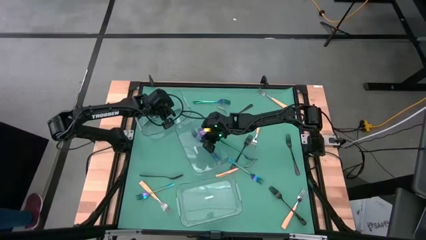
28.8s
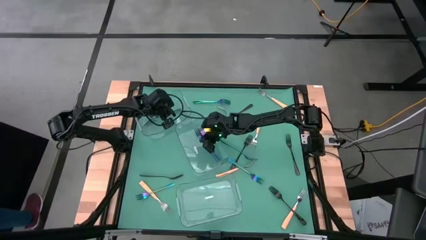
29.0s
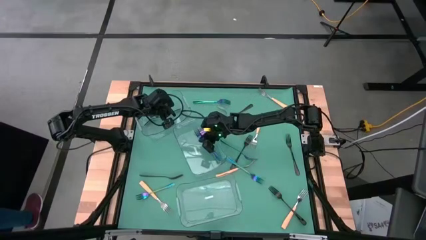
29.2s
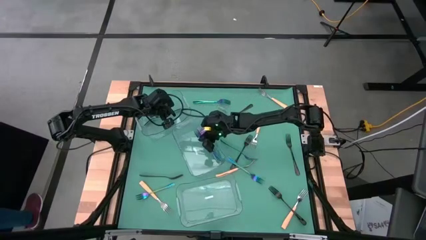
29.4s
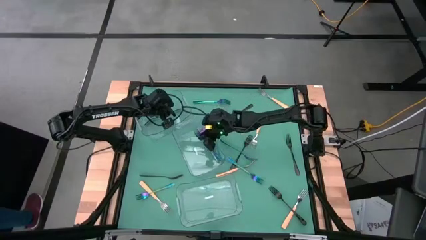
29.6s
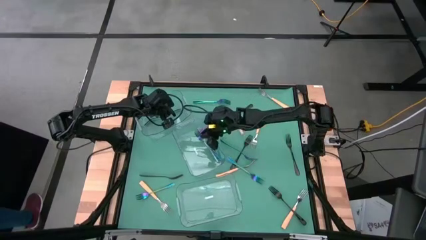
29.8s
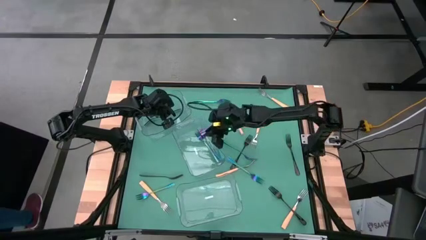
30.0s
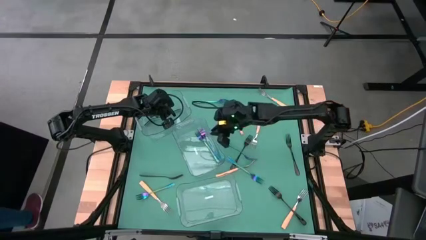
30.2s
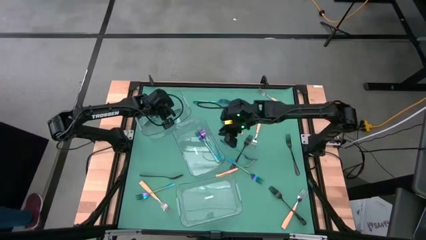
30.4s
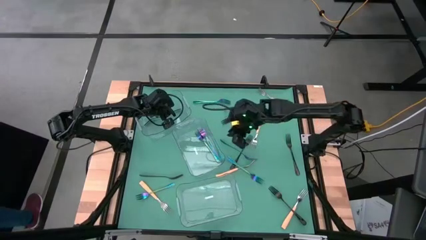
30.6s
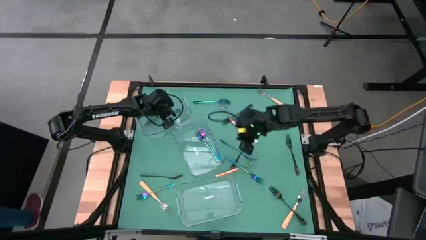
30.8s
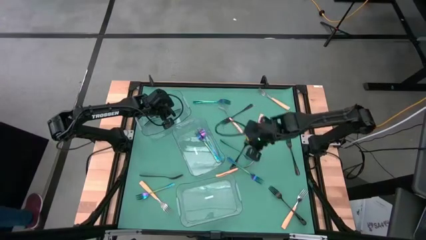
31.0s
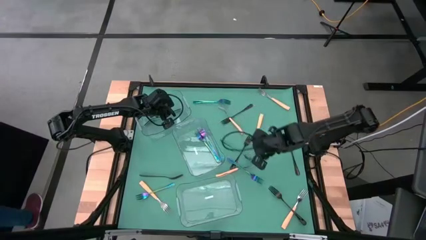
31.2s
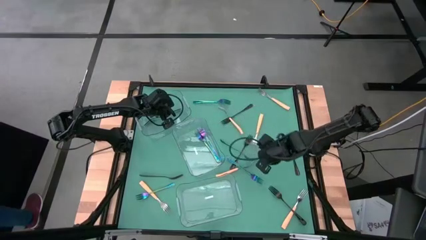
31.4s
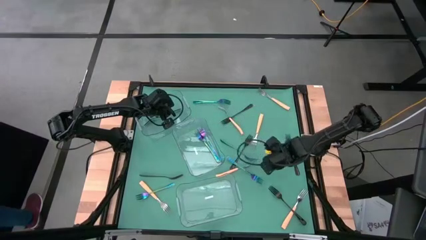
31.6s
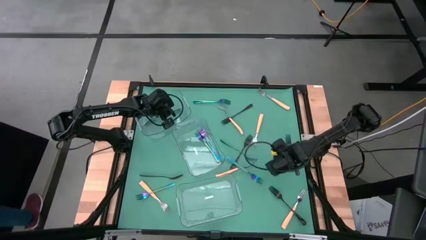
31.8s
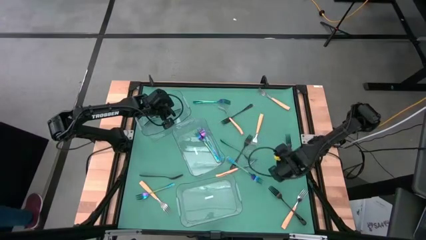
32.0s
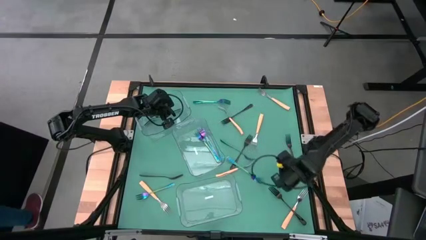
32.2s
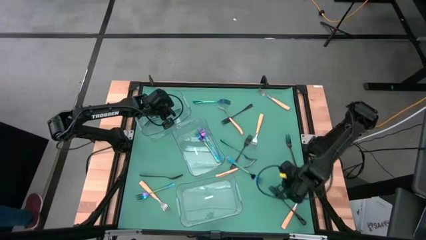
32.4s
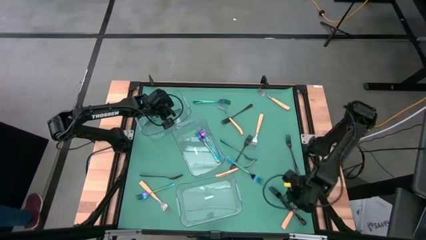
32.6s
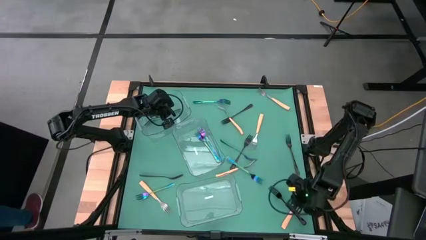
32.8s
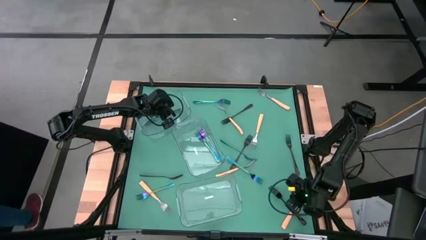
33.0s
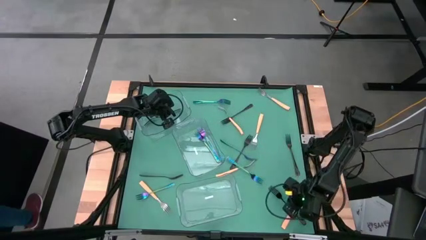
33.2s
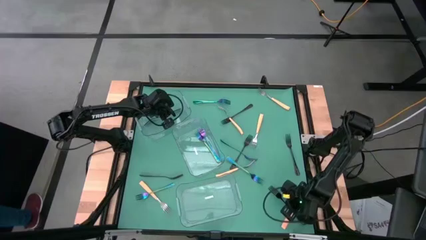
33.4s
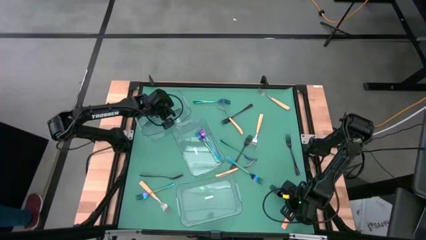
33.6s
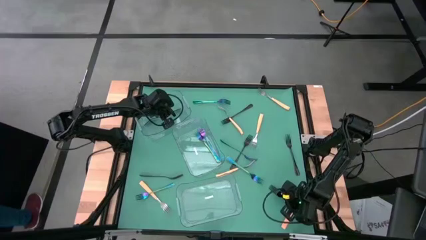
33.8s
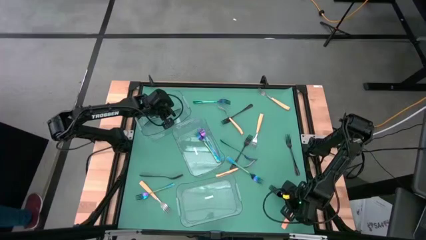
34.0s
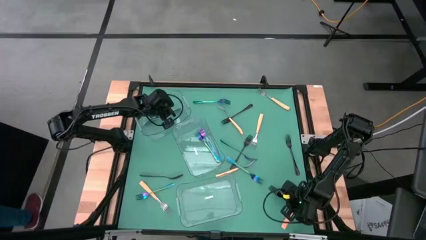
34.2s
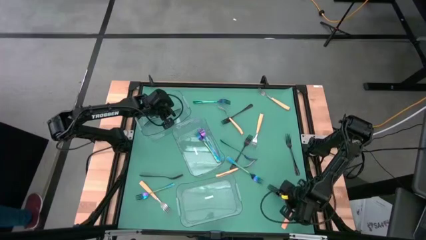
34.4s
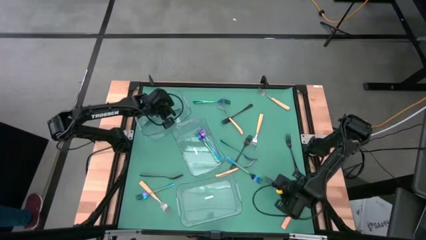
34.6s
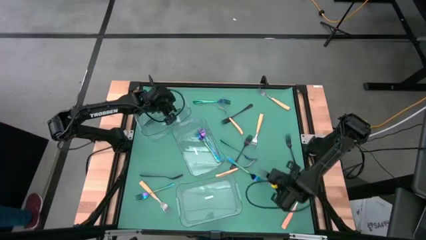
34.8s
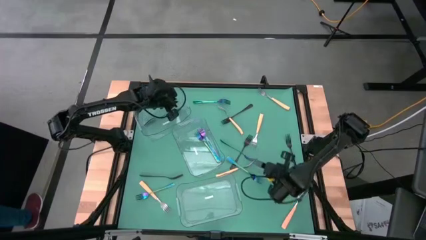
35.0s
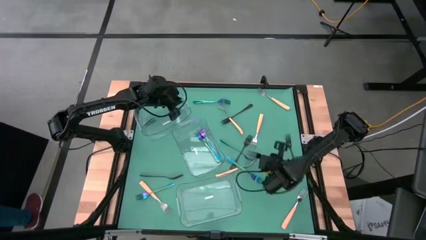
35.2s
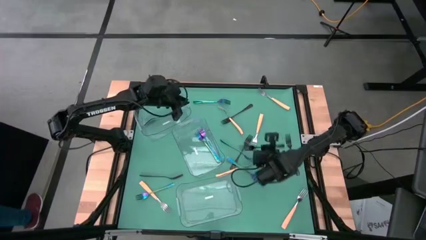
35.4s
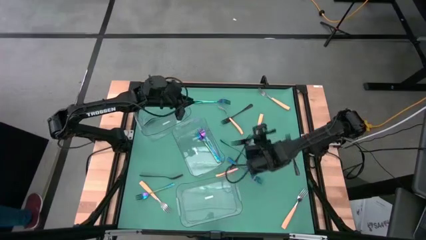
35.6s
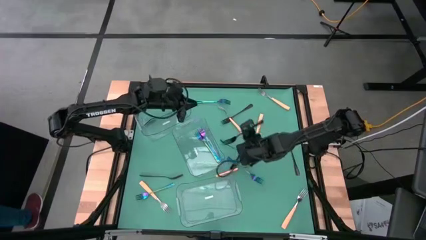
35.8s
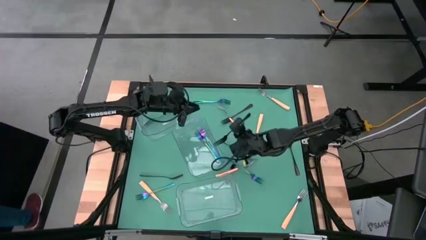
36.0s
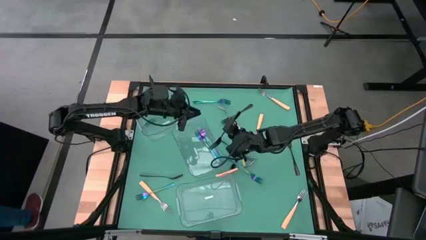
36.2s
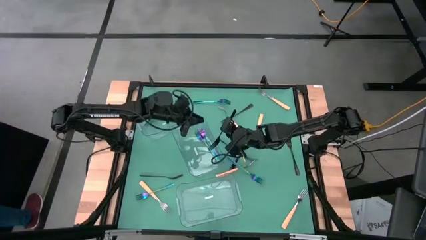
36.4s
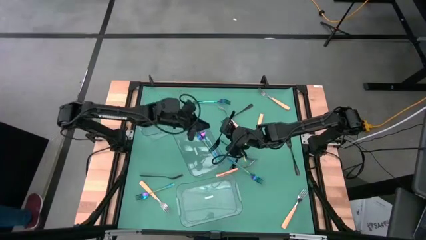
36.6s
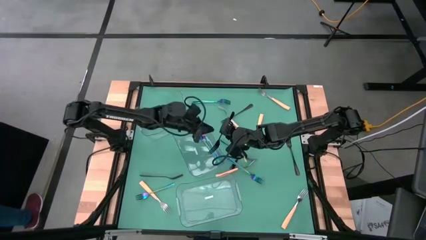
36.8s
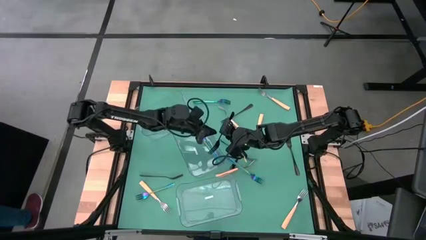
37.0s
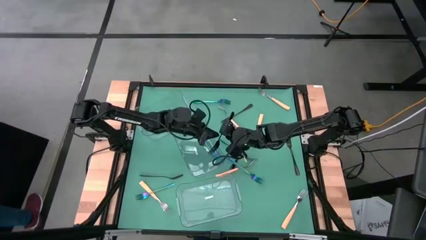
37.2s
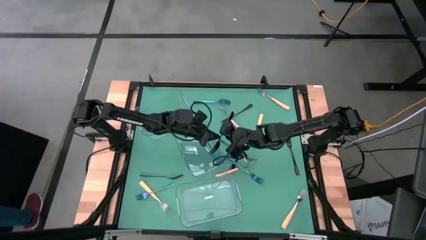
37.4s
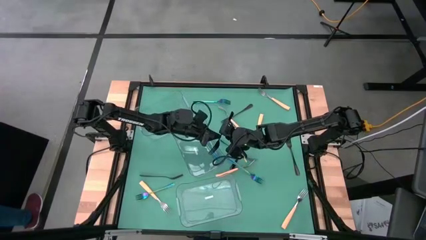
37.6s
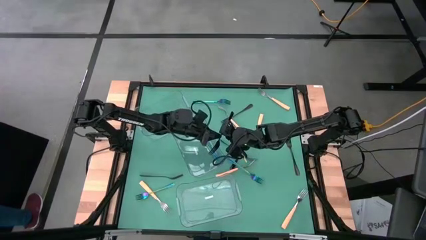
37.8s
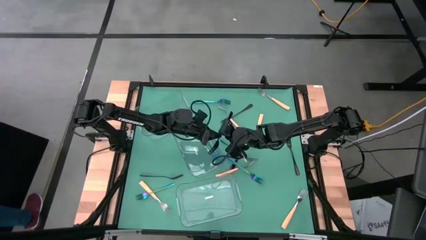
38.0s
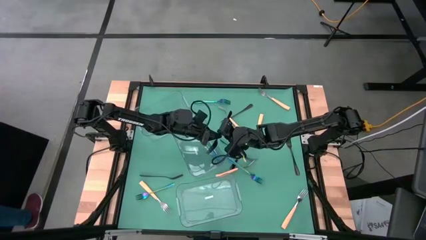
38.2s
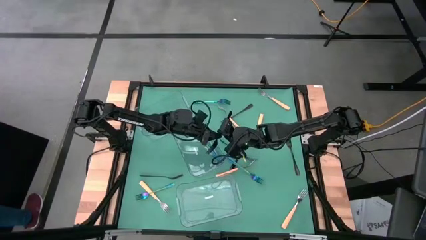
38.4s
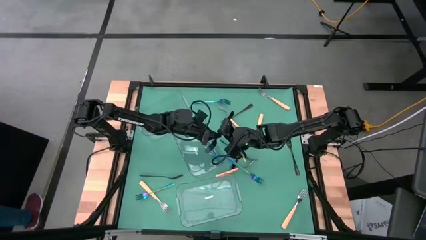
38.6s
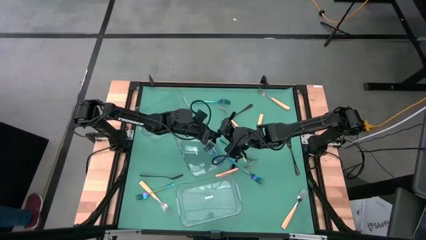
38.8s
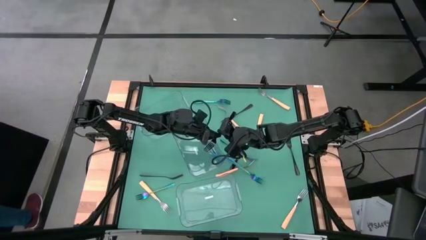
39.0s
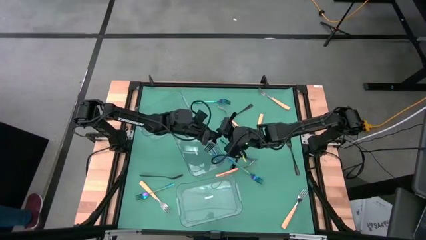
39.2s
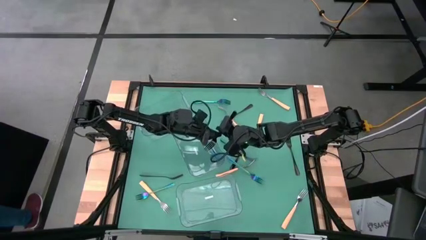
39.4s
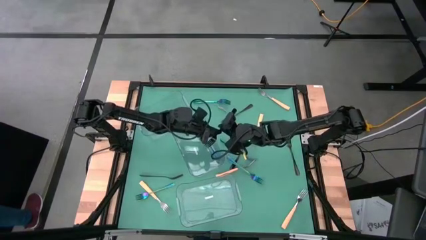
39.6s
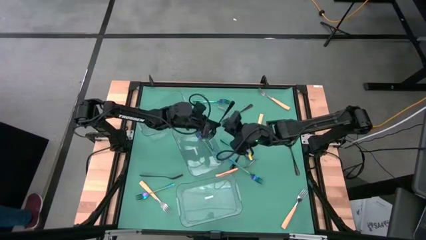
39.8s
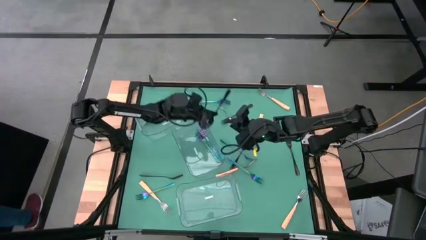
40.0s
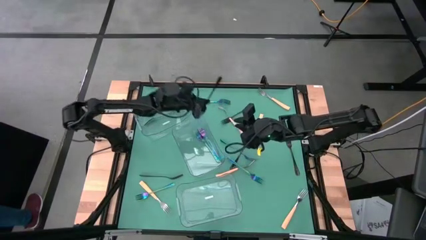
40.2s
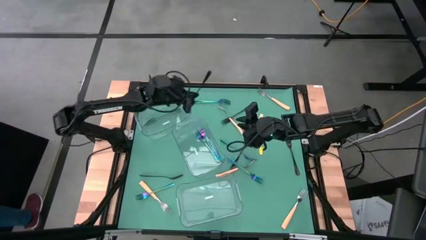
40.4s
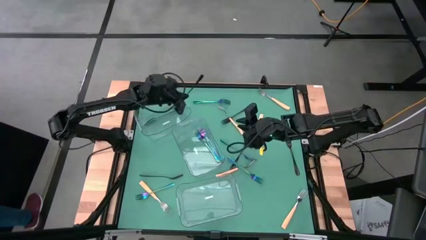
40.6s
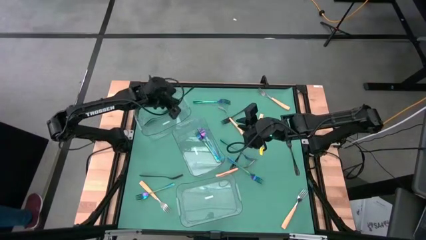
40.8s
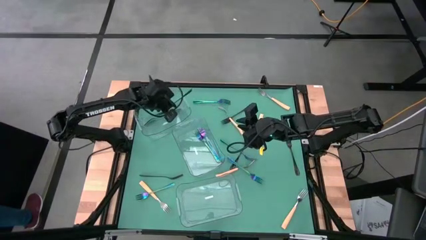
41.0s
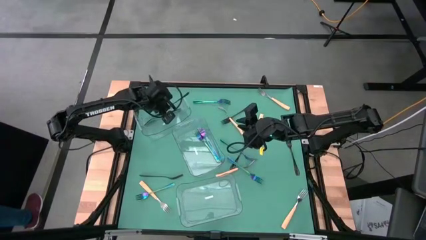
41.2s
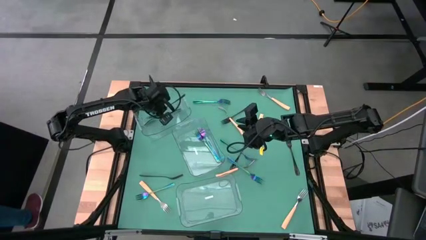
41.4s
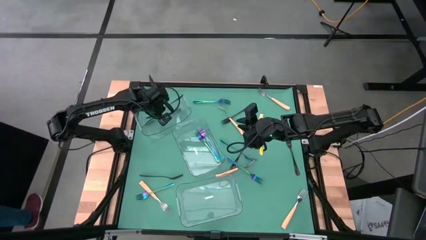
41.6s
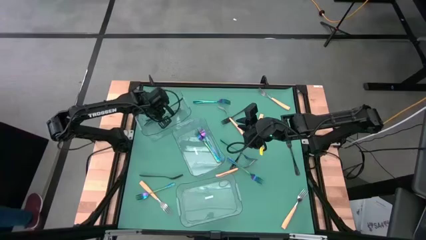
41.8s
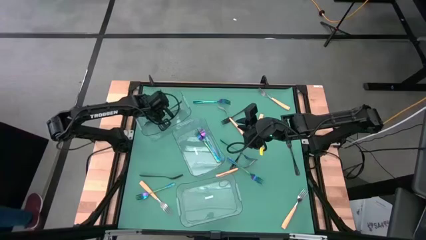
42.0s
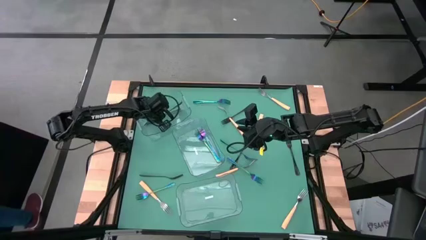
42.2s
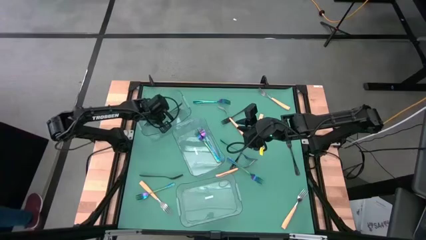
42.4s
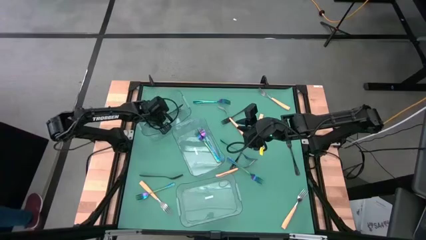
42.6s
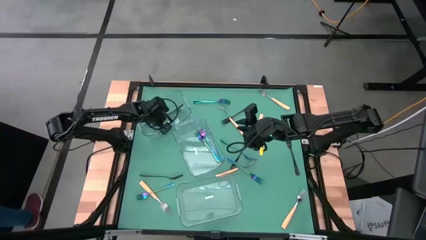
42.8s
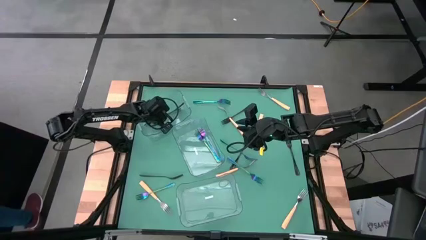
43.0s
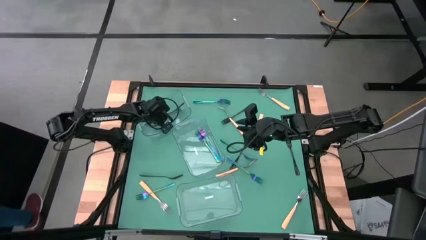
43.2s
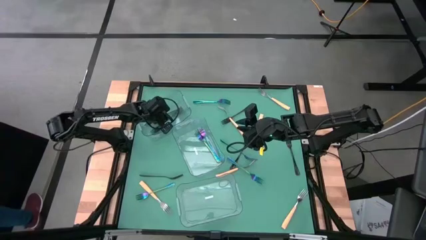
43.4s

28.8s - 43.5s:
Task: Sort silverware by color (type)
Put the black fork into the top transparent bin

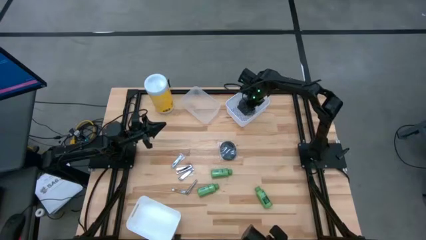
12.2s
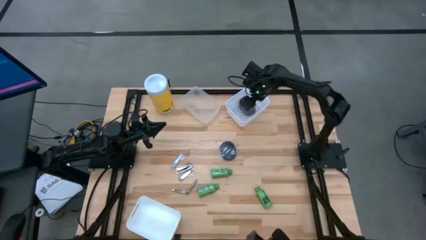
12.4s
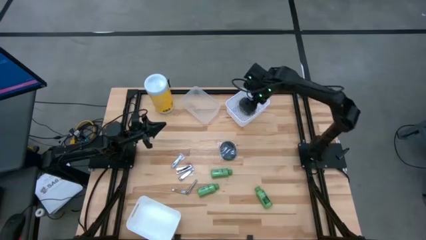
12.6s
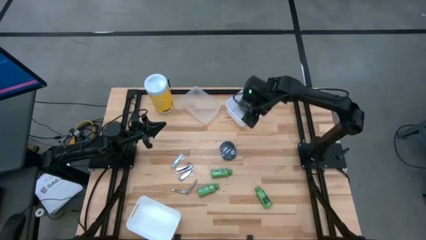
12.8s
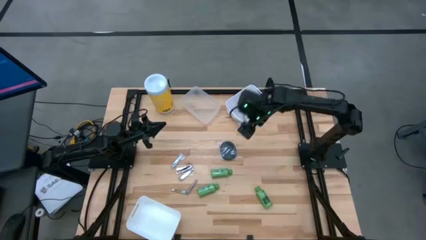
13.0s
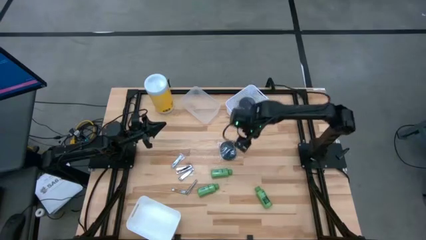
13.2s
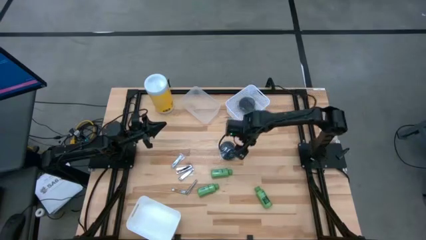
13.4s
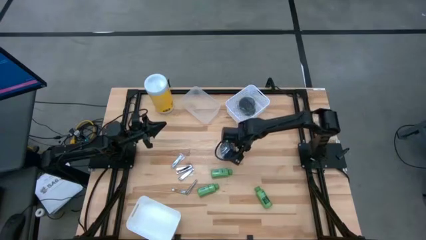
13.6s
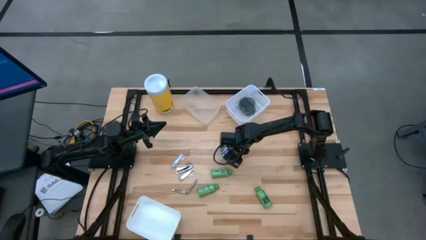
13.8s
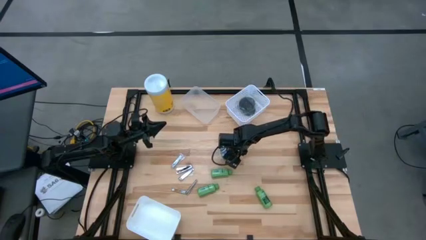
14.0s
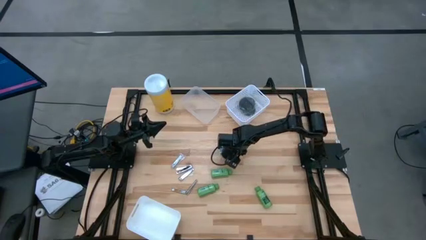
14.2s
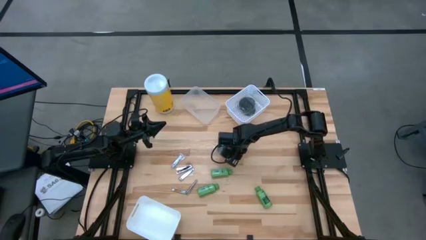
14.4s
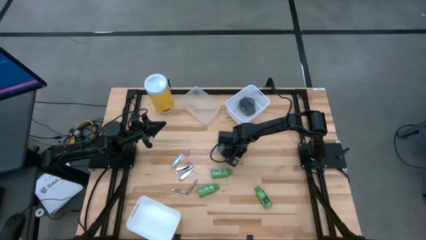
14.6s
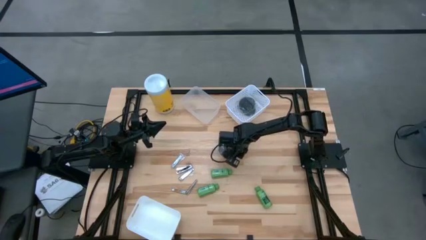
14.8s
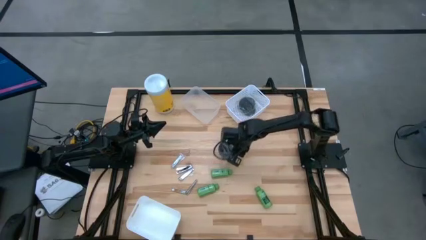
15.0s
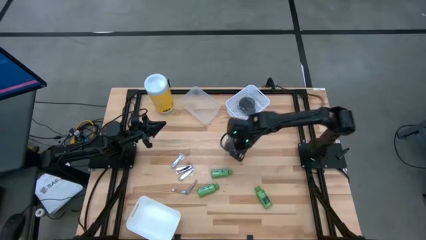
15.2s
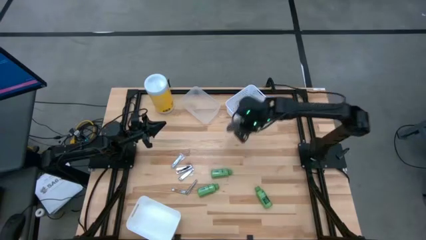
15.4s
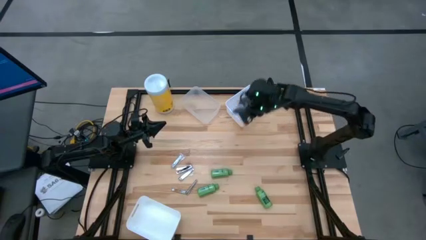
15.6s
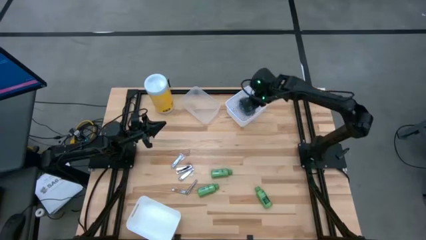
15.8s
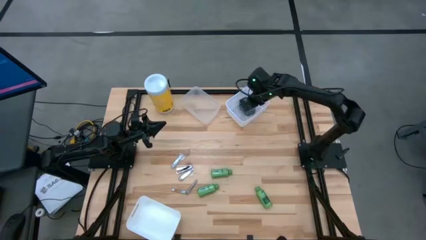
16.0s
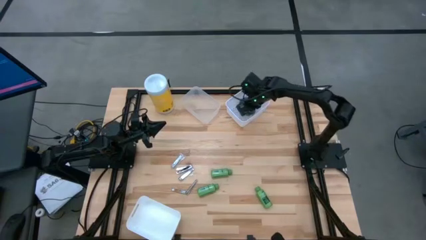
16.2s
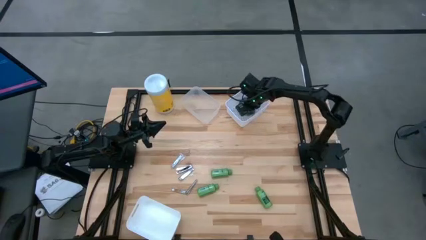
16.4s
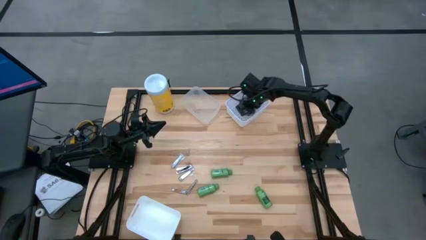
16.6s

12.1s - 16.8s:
Task: Pick & Place Travel size toiletries
Put the black hairbrush into the top white bin
